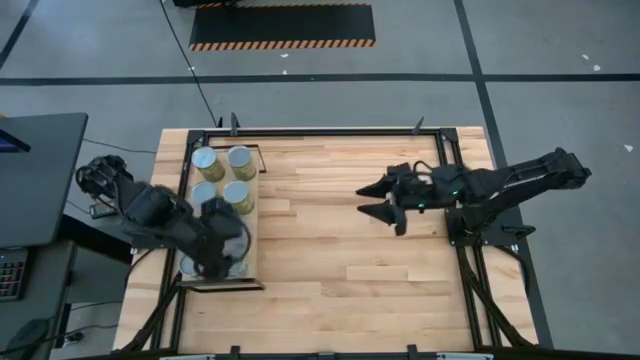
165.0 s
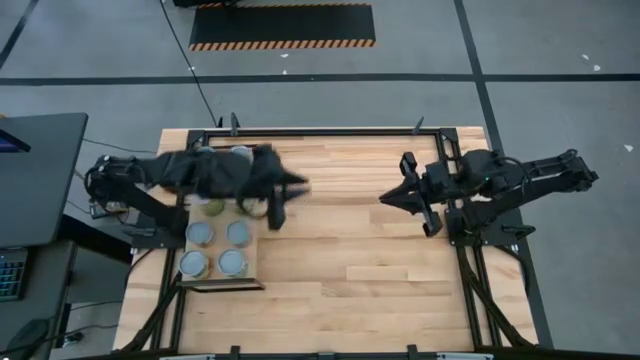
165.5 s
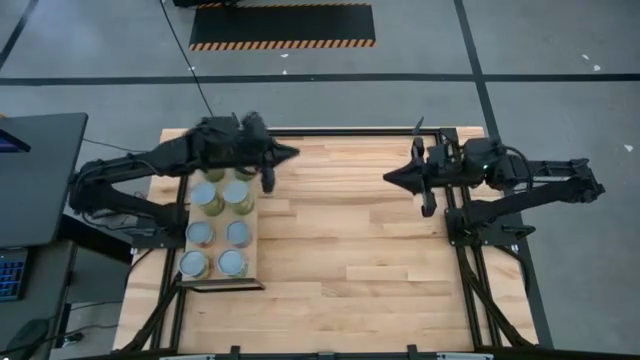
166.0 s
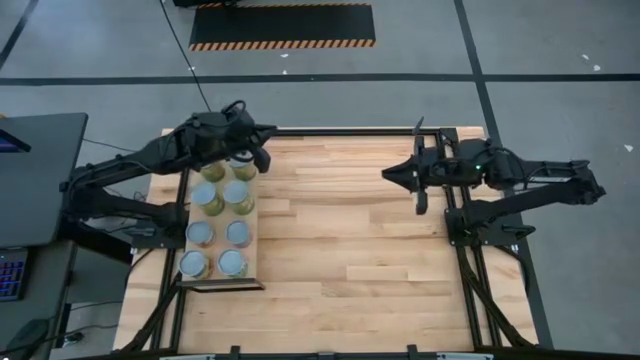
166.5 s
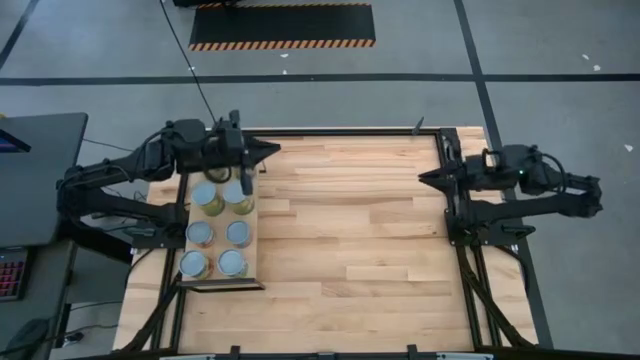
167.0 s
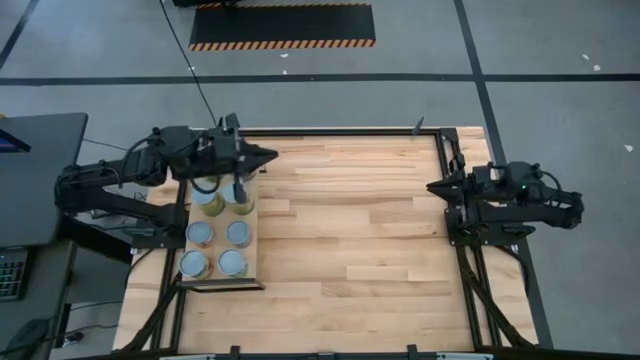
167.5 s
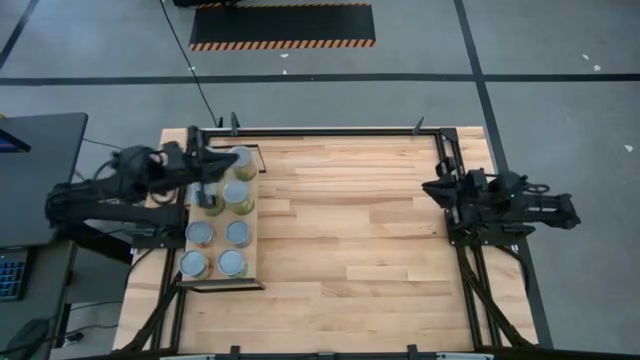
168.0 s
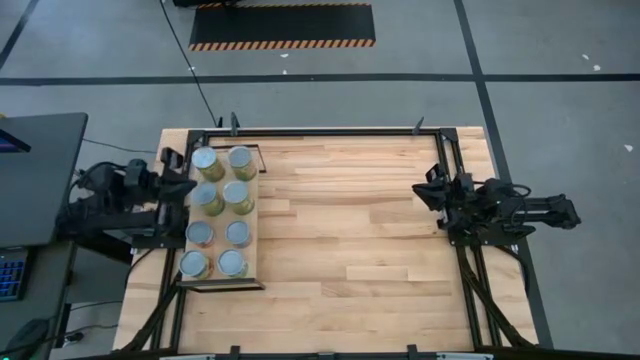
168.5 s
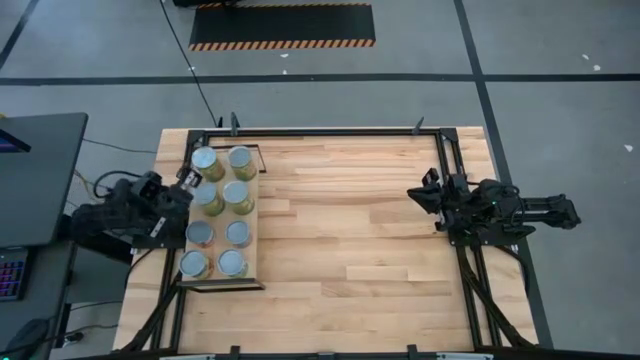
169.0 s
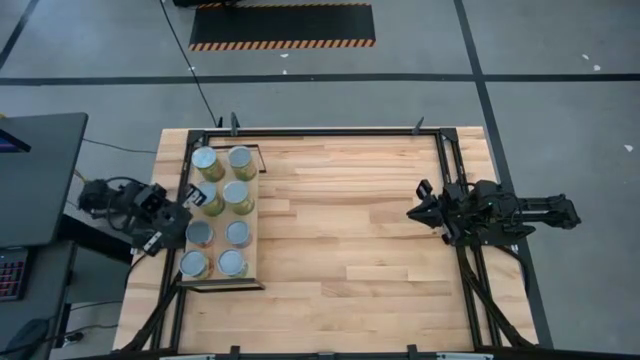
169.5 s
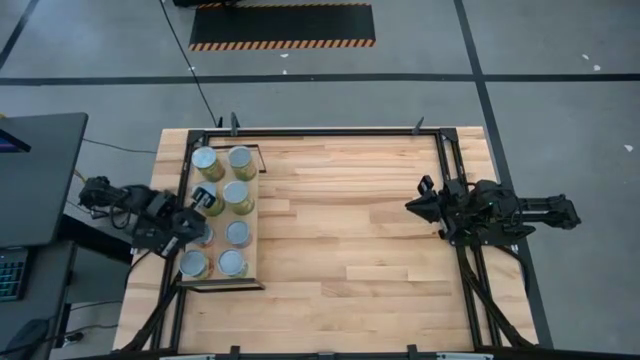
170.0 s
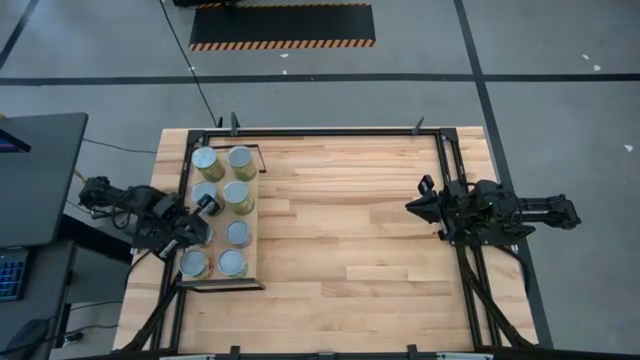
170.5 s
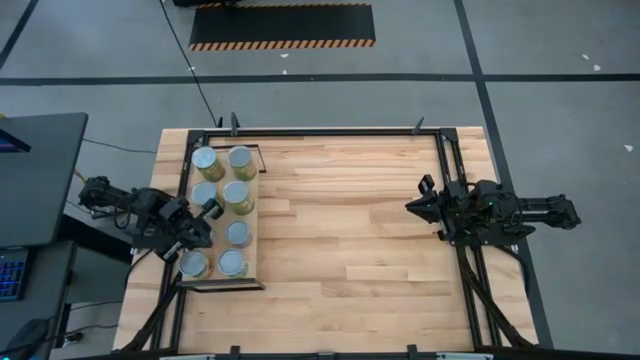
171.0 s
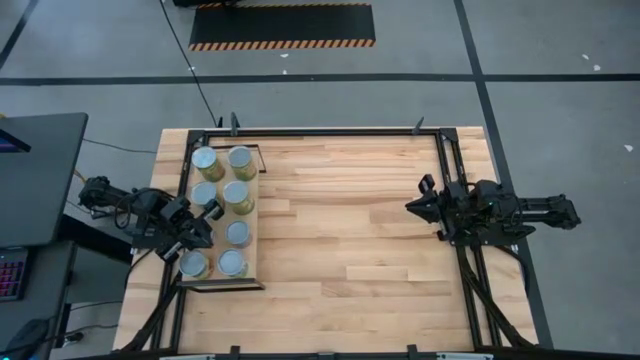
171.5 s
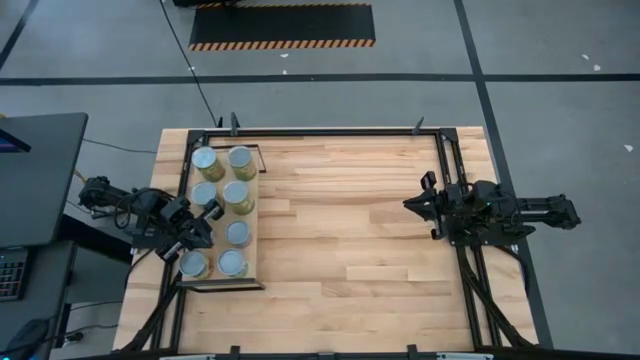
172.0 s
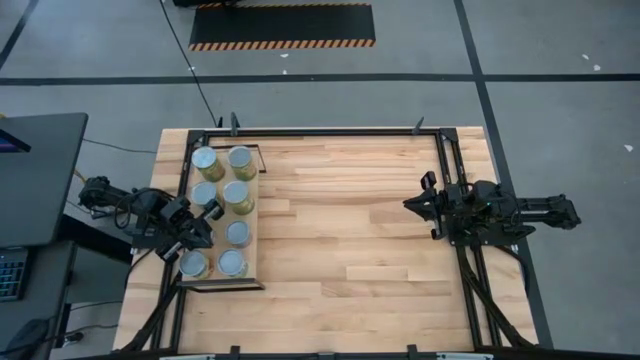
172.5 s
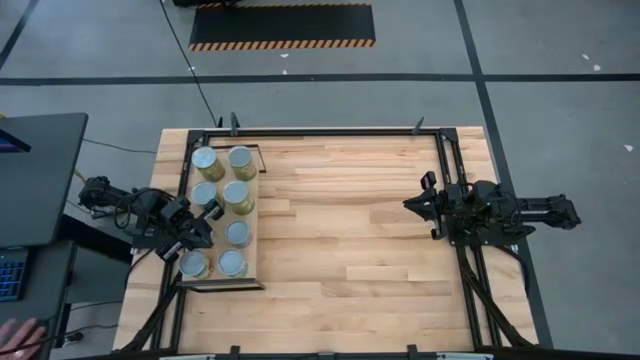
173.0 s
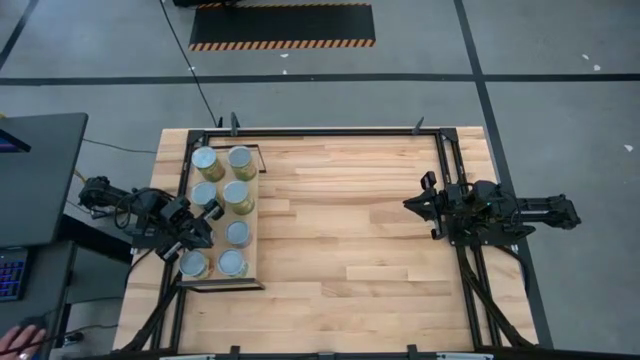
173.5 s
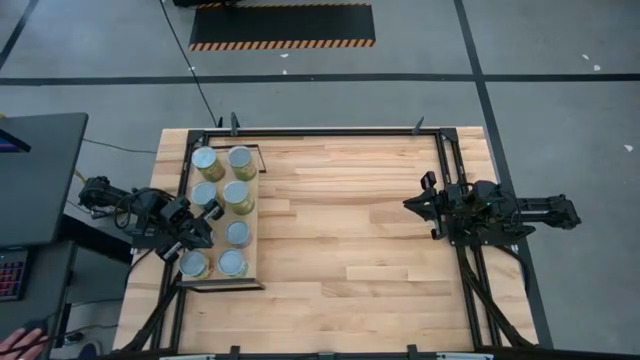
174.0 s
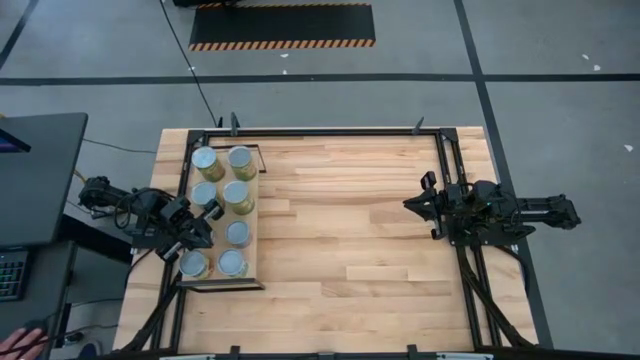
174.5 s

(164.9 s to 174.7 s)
Task: Pick and place cans onto a shelf
Return to Home Position

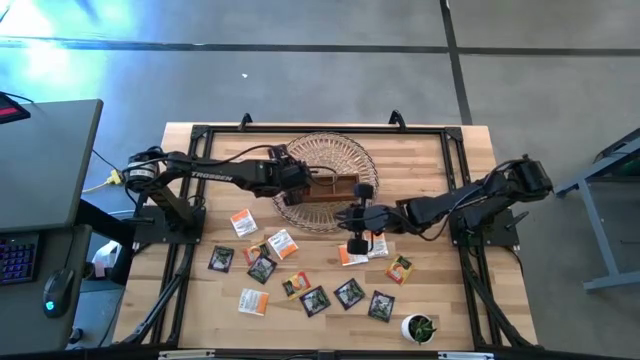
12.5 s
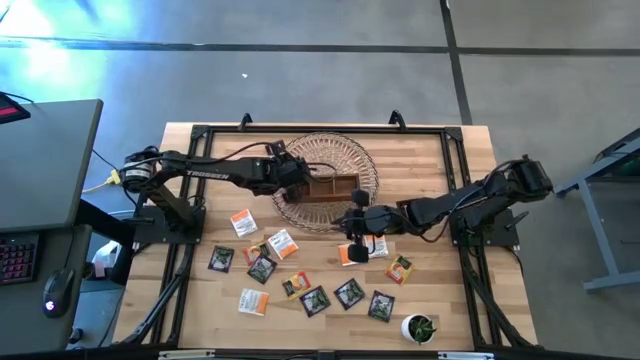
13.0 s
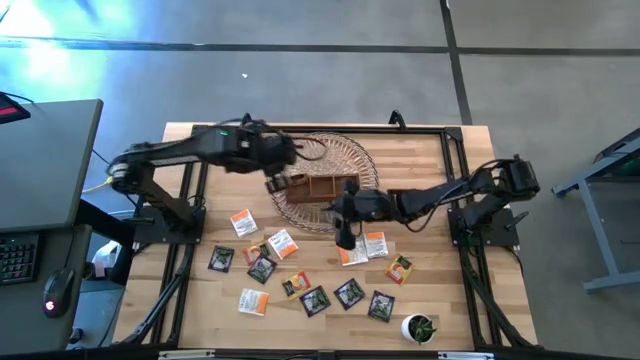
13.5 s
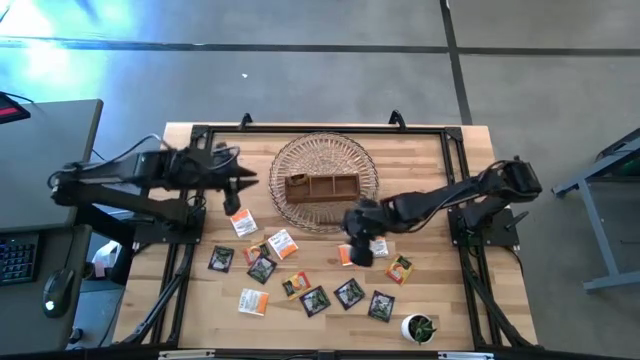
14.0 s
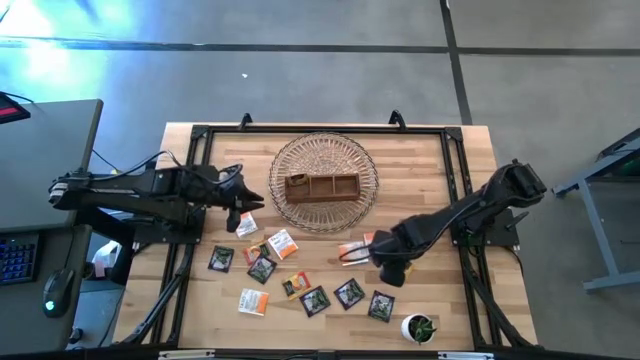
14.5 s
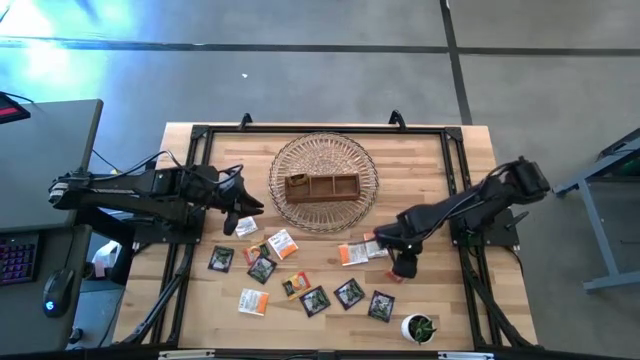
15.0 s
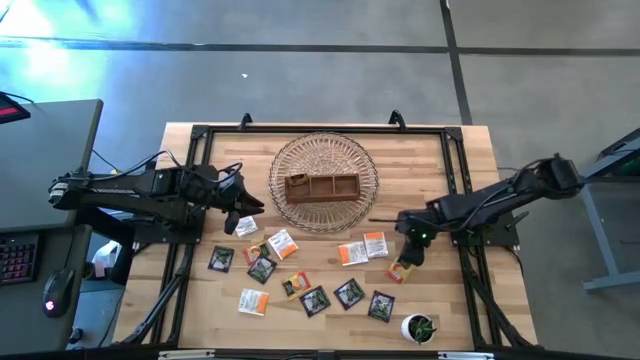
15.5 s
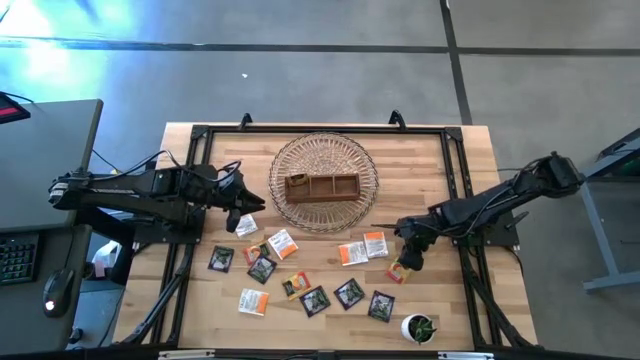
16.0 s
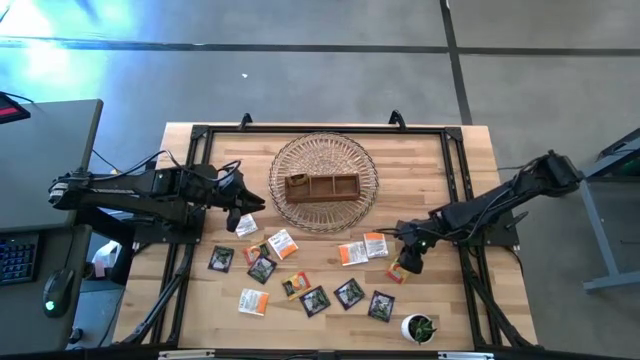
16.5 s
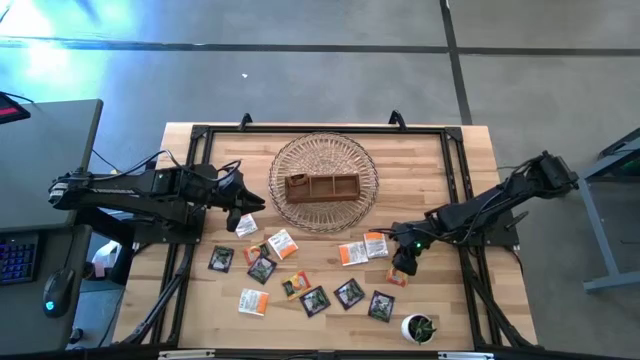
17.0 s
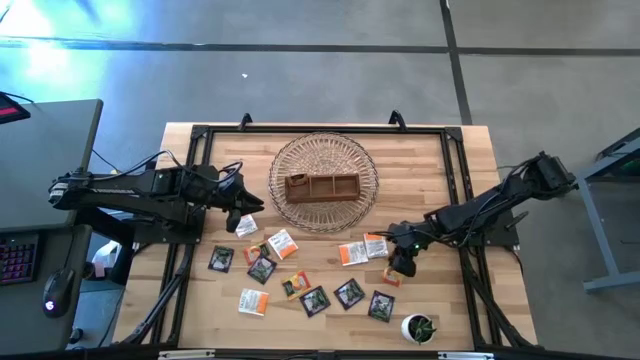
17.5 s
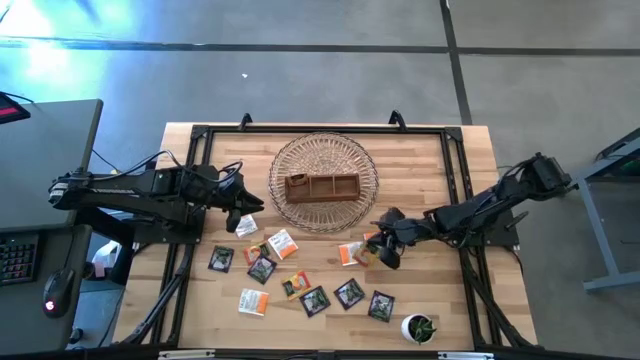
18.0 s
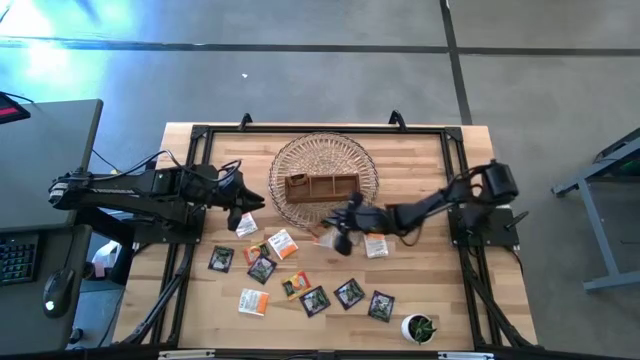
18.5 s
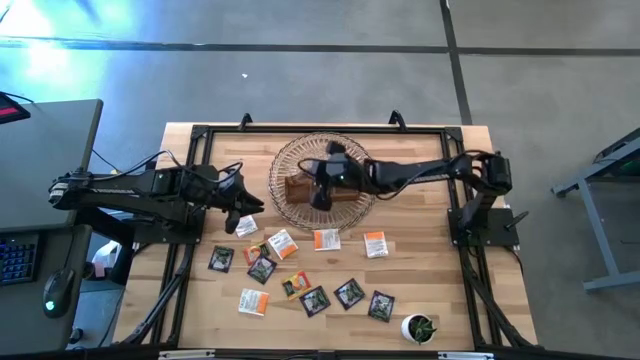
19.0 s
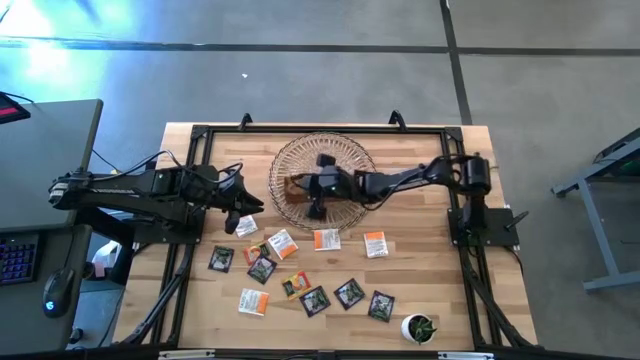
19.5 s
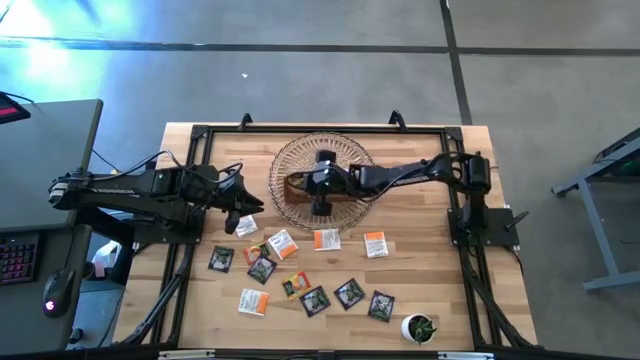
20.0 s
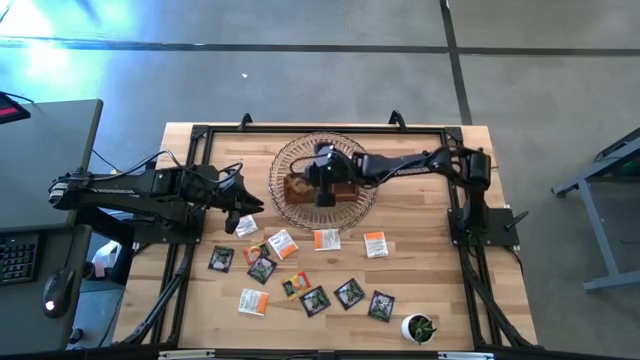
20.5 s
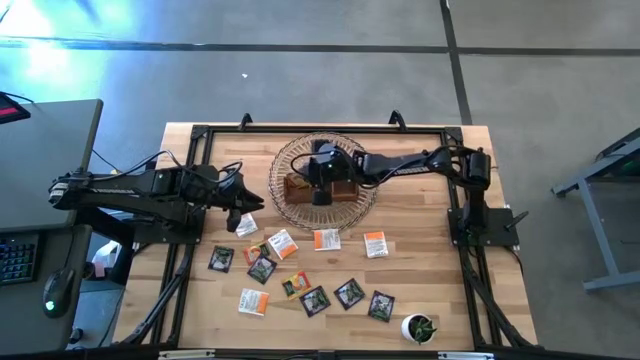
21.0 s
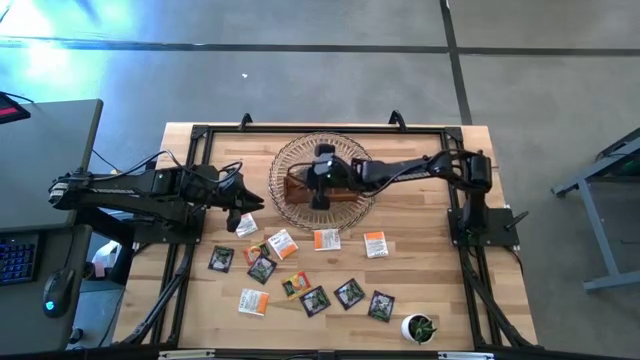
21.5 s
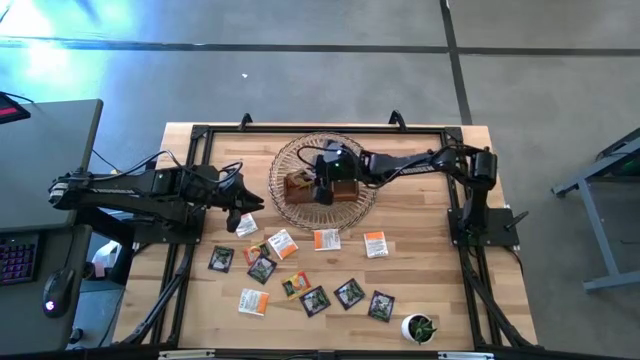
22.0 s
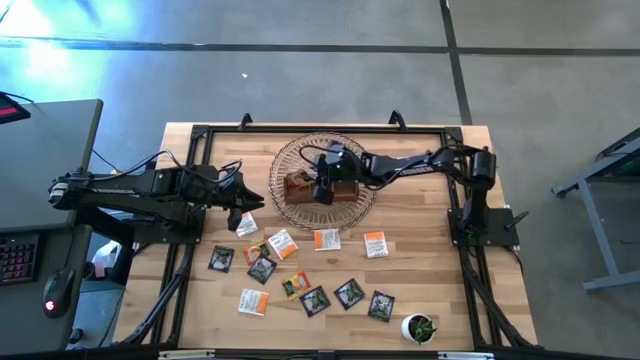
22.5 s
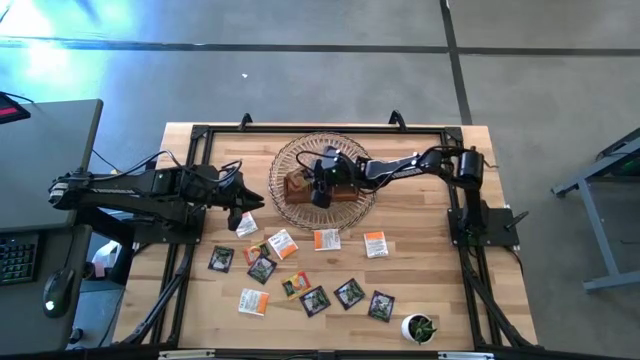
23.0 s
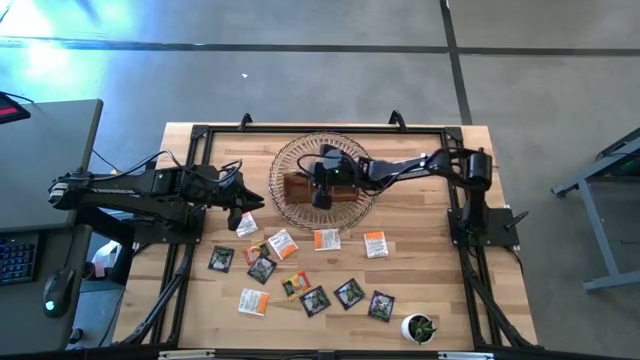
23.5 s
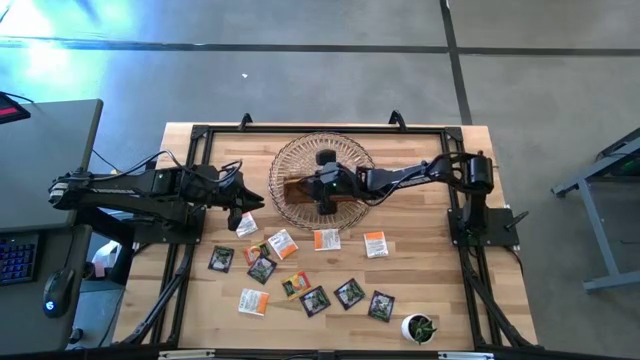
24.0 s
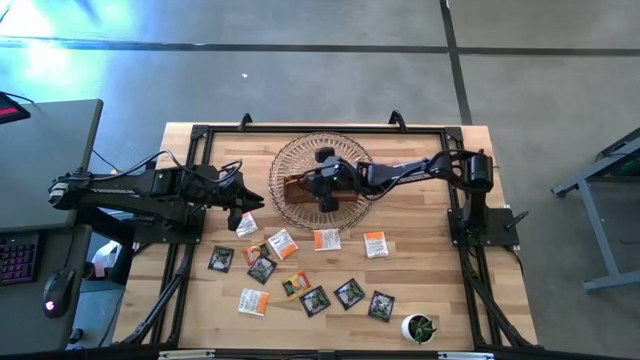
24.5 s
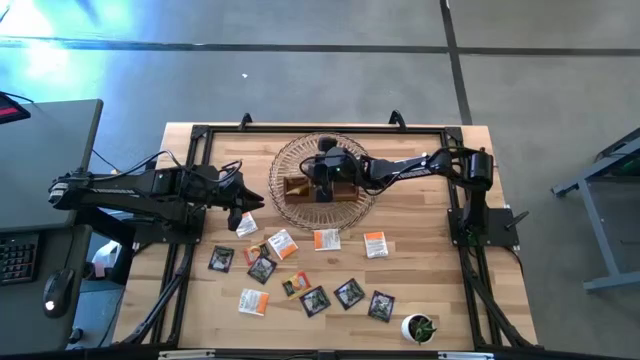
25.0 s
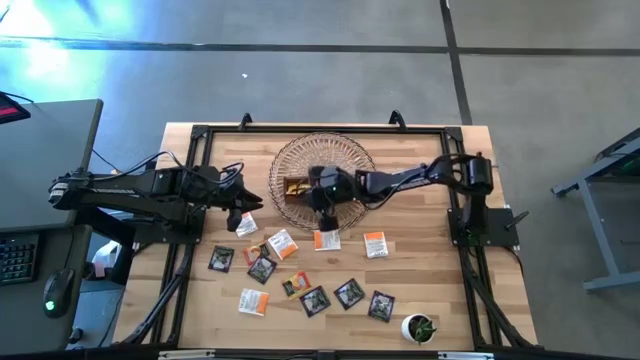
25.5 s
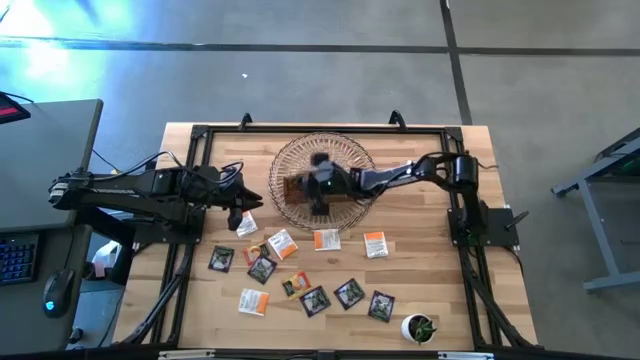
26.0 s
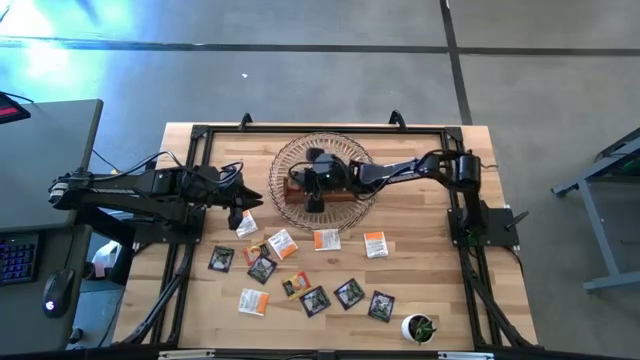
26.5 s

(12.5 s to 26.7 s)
Task: Pick & Place Tea
Put the yellow tea bag into the left section of the wooden organizer
